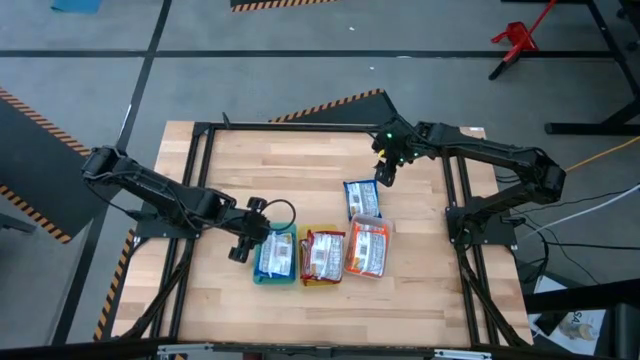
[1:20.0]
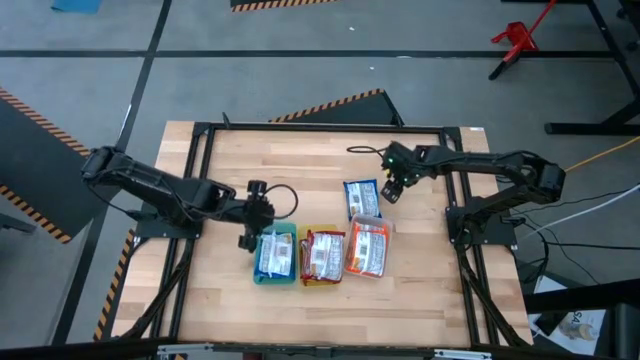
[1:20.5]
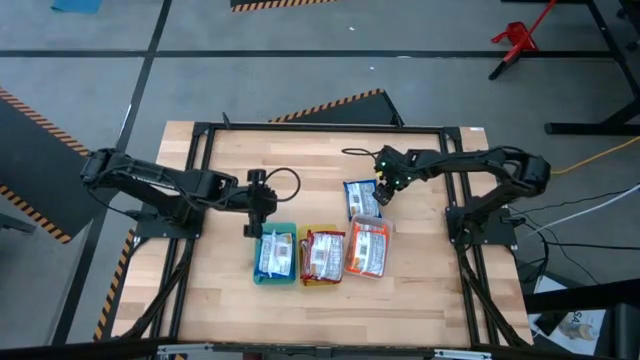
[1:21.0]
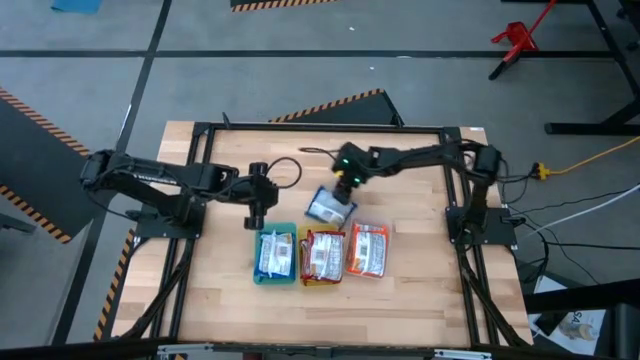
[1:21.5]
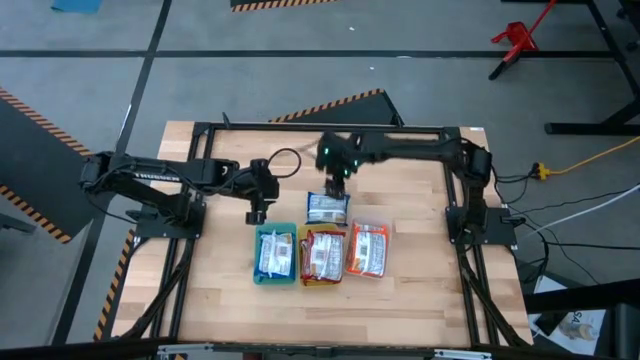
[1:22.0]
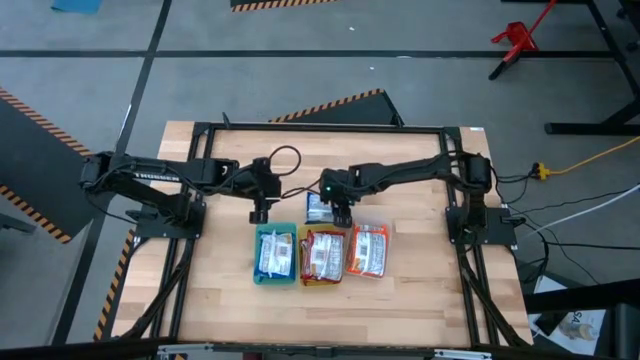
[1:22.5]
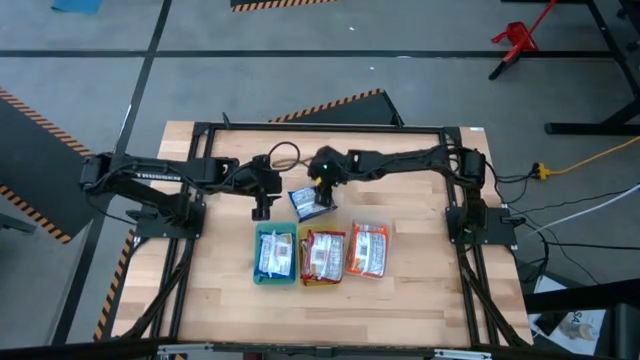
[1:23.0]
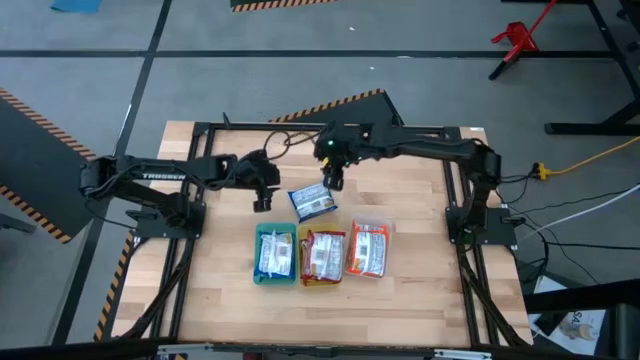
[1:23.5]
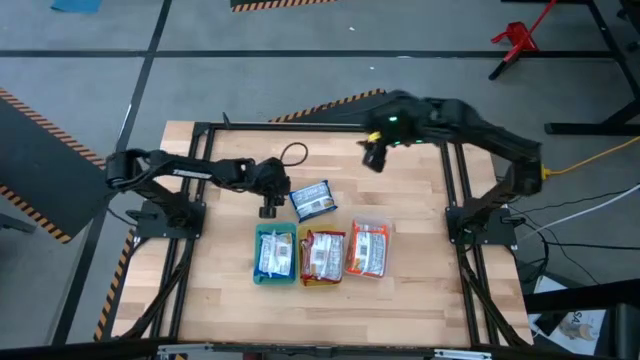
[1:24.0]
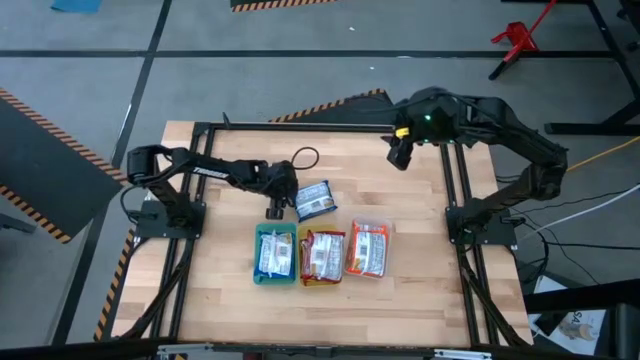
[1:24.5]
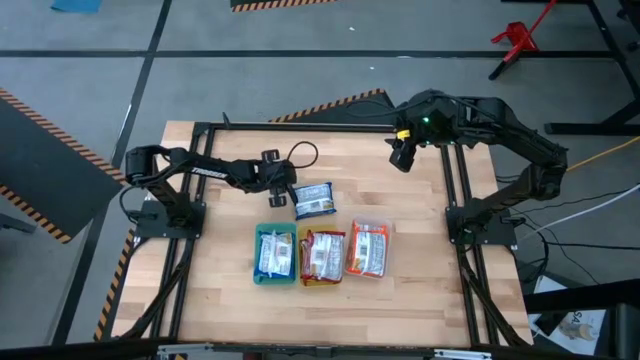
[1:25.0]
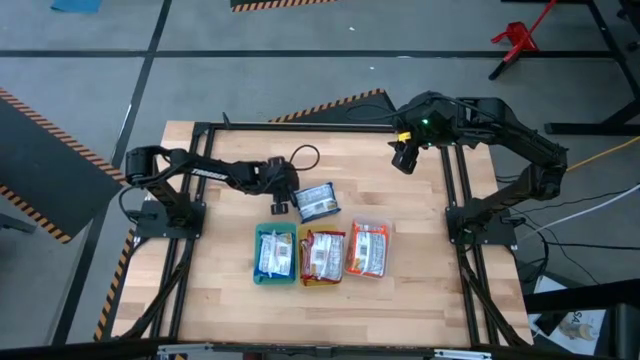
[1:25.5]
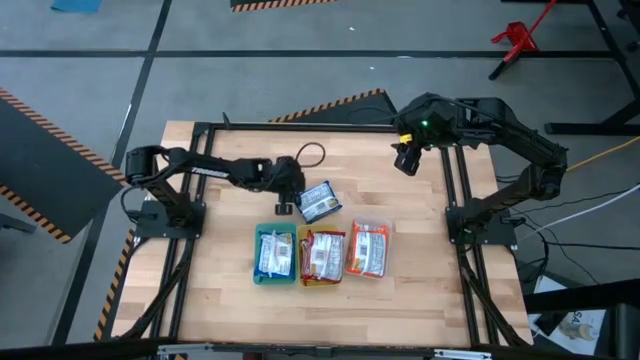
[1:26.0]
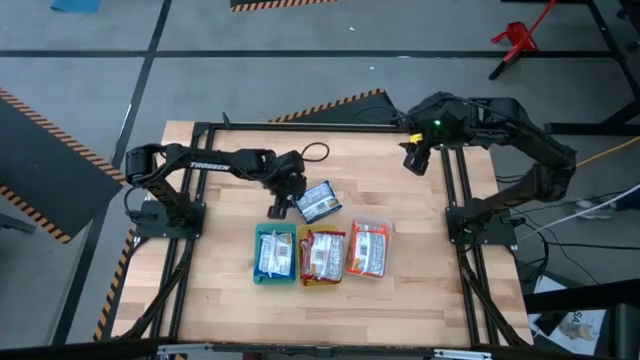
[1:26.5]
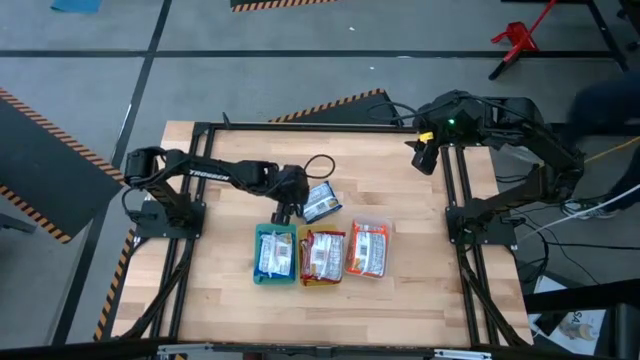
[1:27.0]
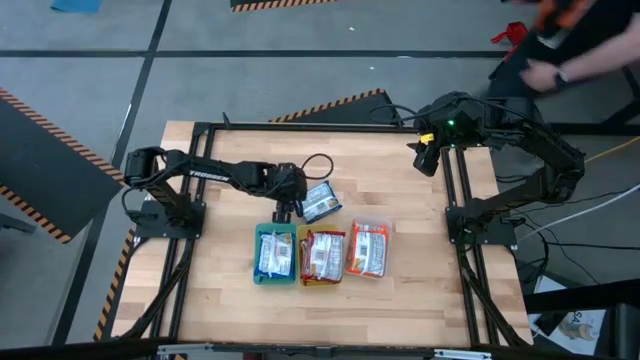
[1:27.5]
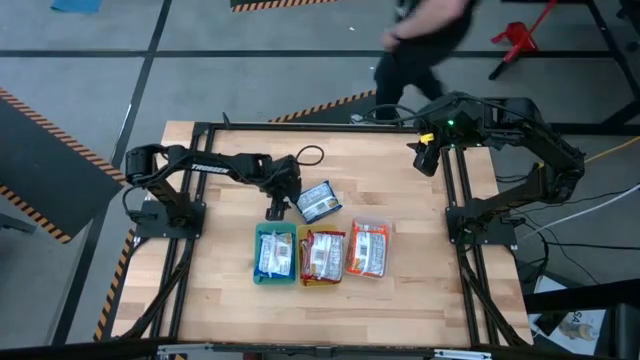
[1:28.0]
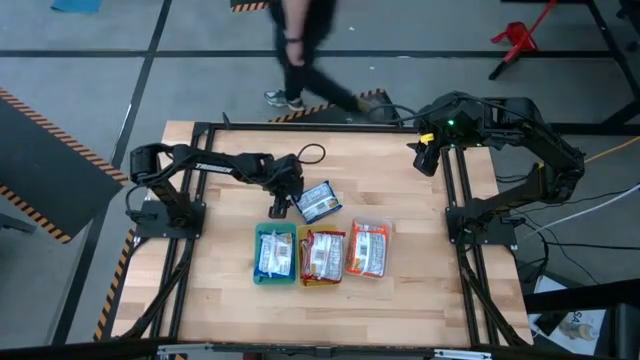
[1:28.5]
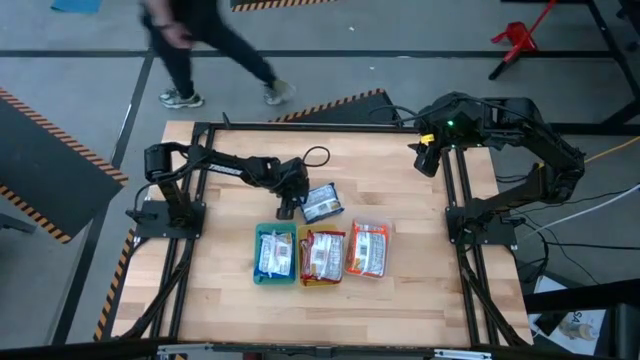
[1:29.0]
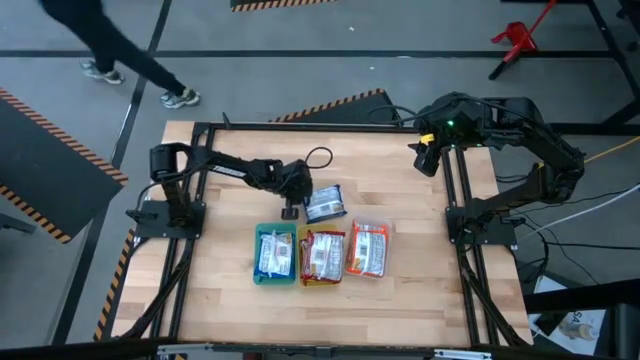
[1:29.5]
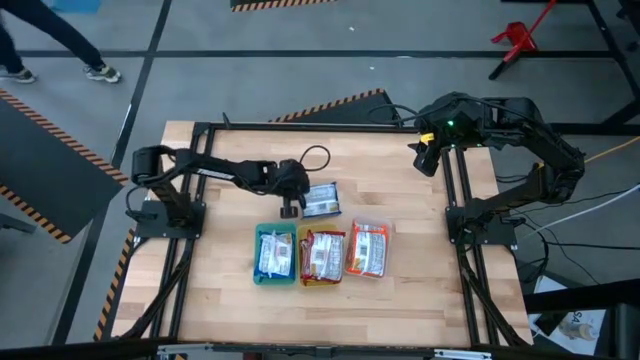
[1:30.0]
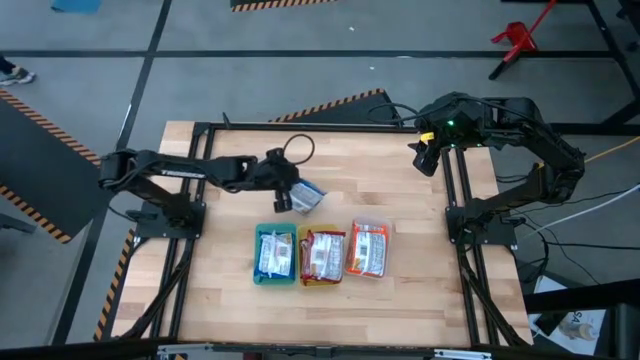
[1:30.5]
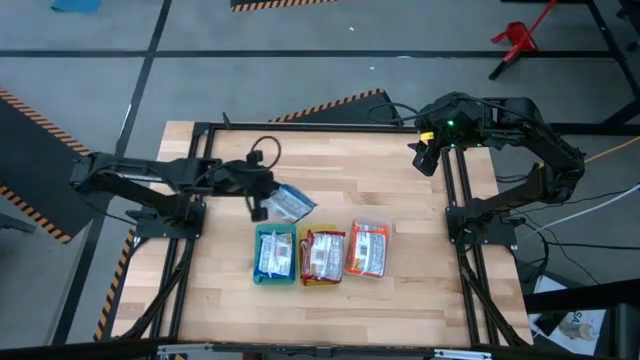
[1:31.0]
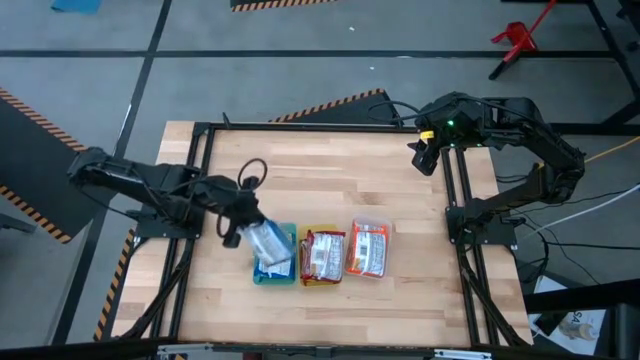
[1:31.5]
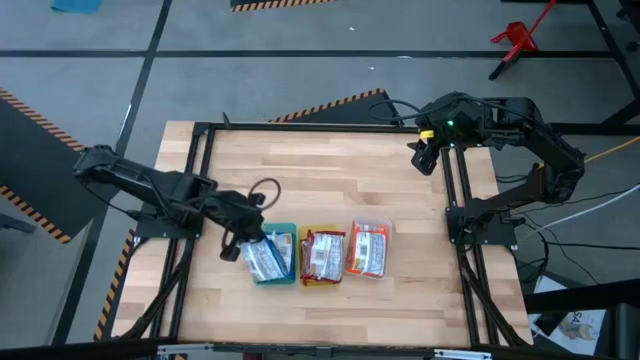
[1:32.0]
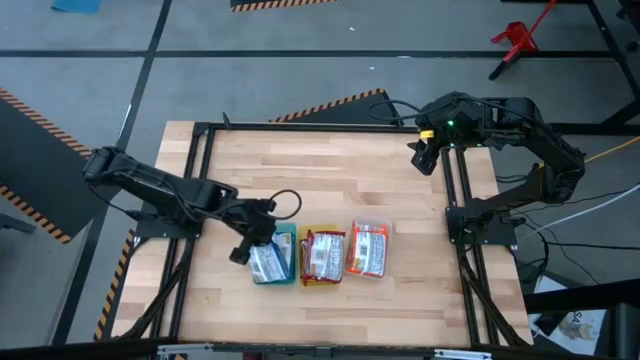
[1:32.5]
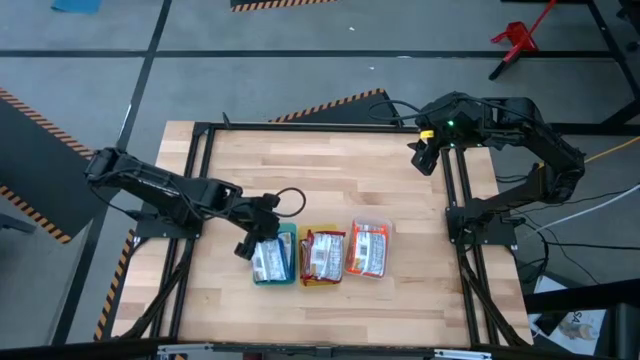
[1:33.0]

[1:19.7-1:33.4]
Task: Sort Maruchan noodles
Put the blue noodle pack into the green bin

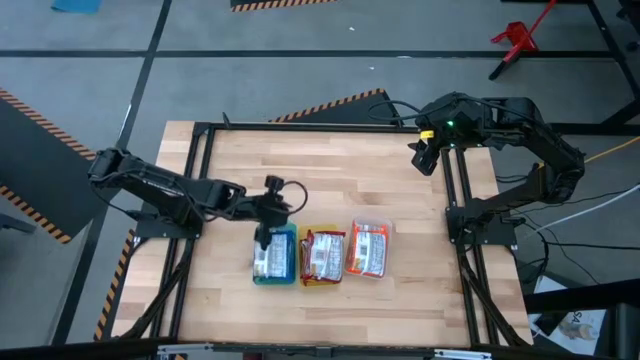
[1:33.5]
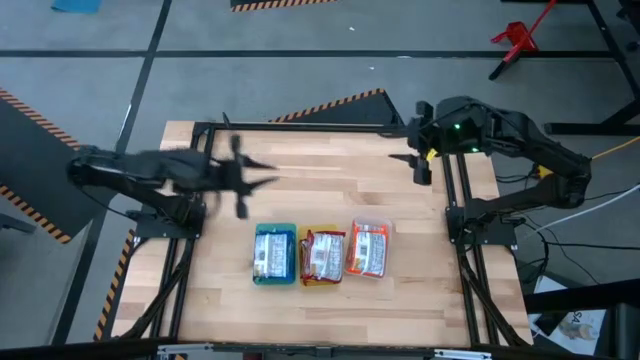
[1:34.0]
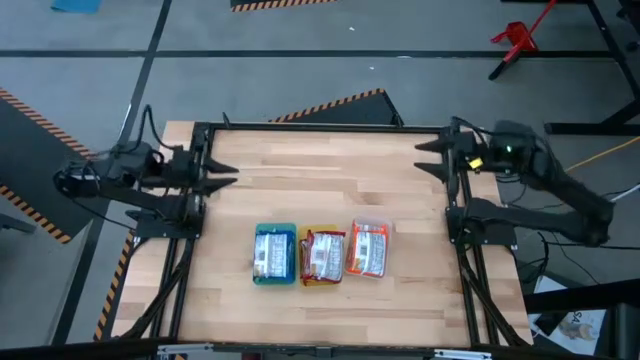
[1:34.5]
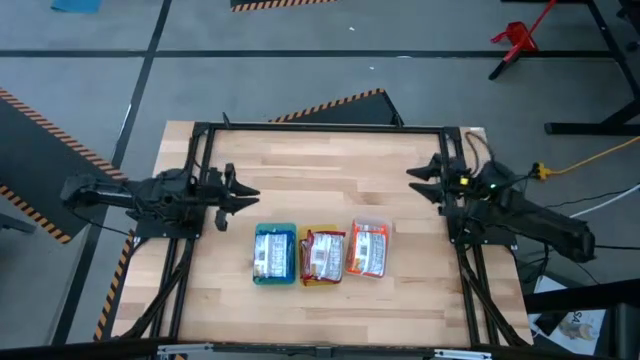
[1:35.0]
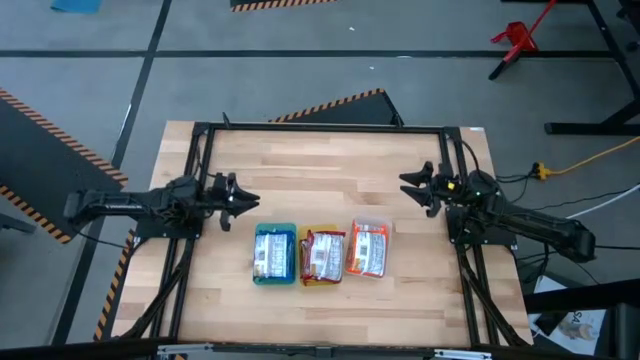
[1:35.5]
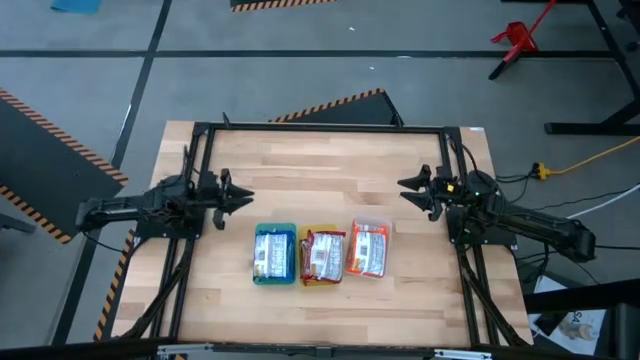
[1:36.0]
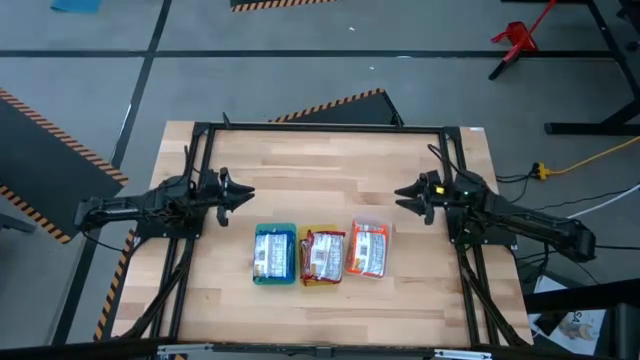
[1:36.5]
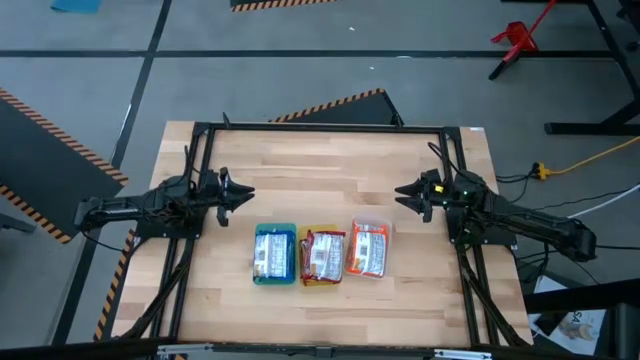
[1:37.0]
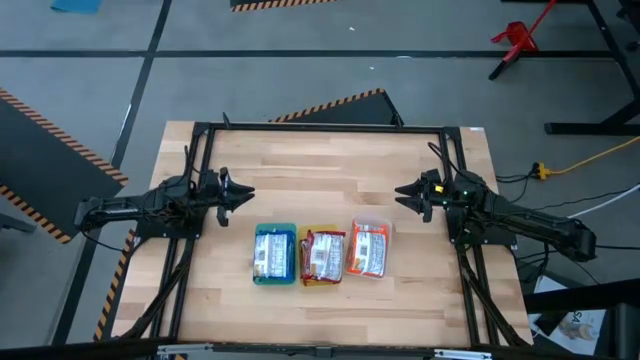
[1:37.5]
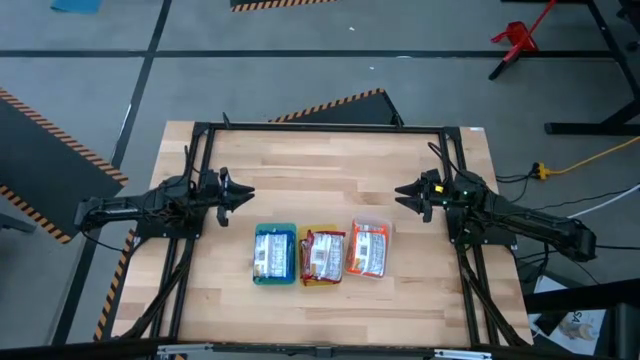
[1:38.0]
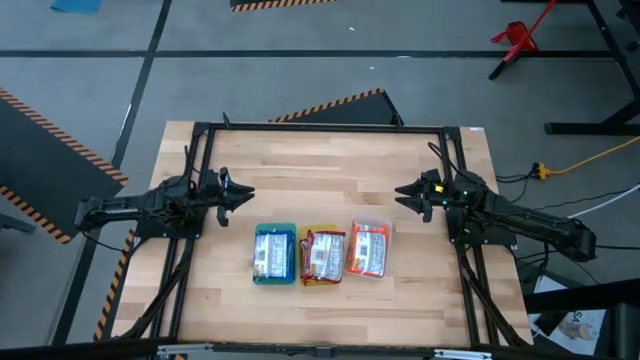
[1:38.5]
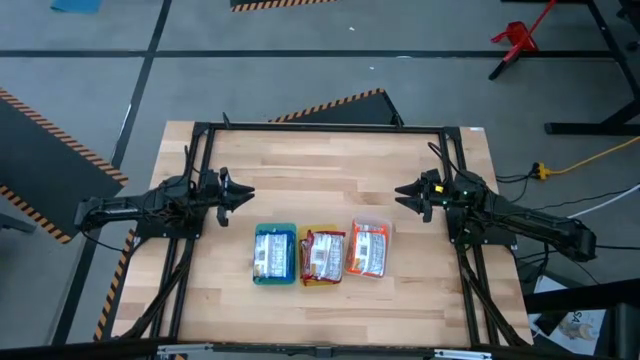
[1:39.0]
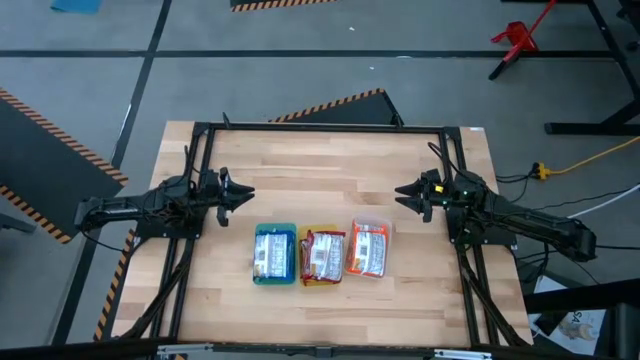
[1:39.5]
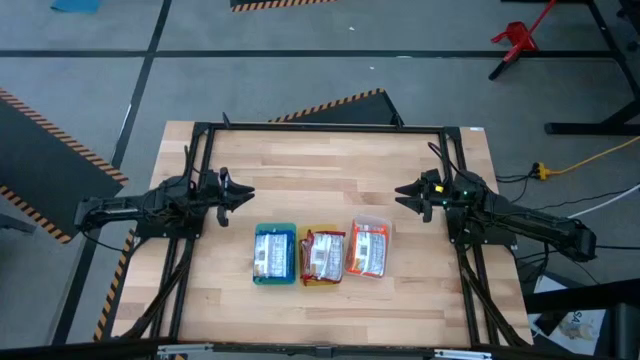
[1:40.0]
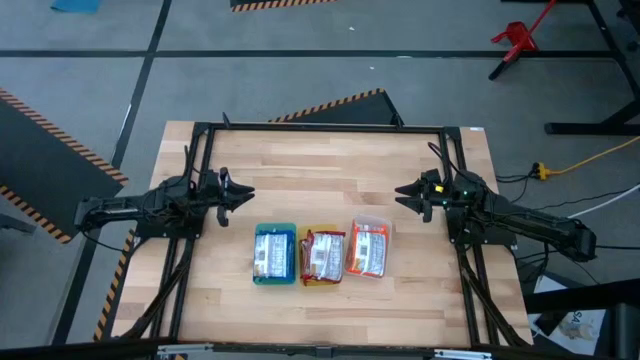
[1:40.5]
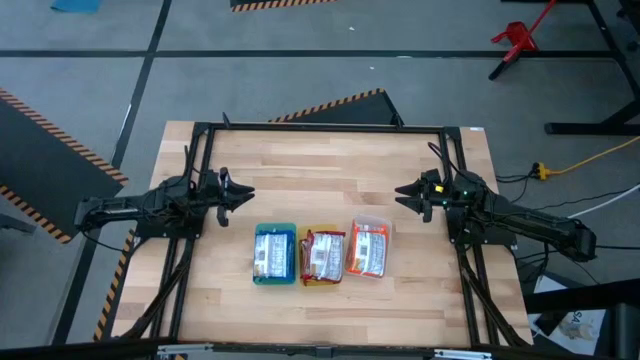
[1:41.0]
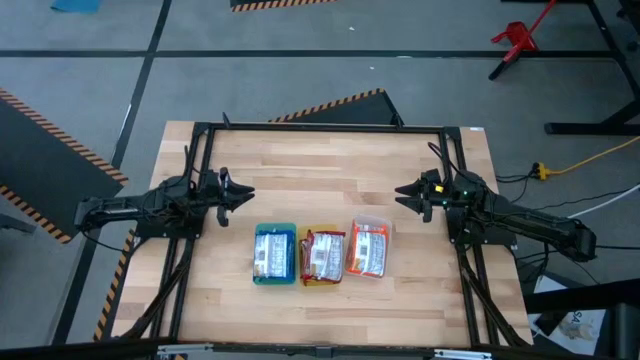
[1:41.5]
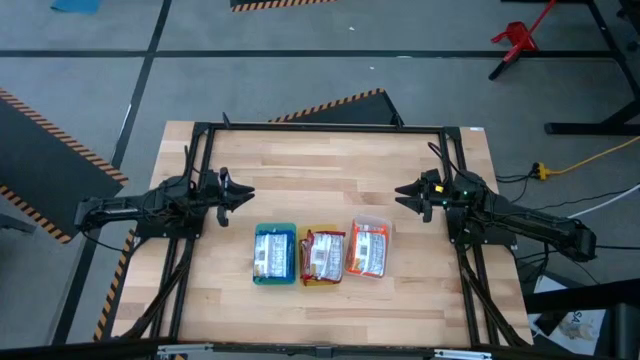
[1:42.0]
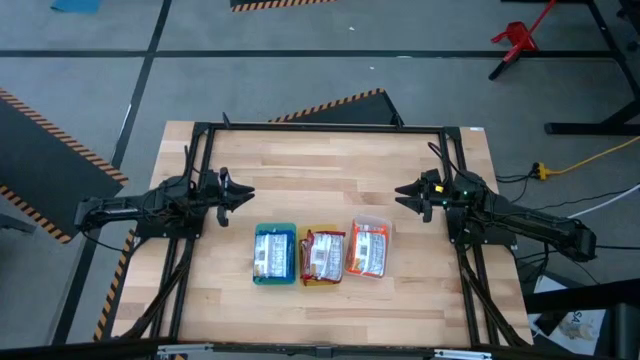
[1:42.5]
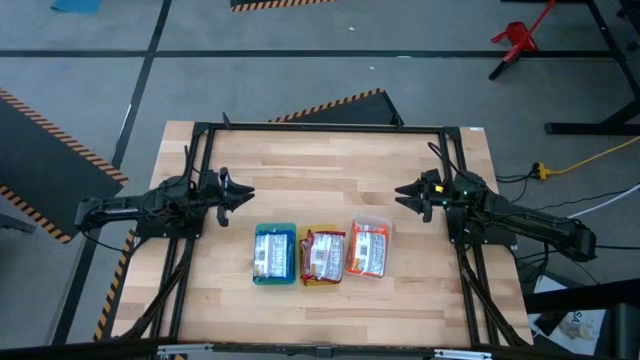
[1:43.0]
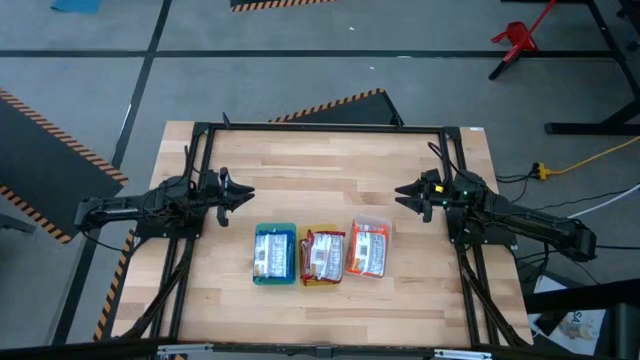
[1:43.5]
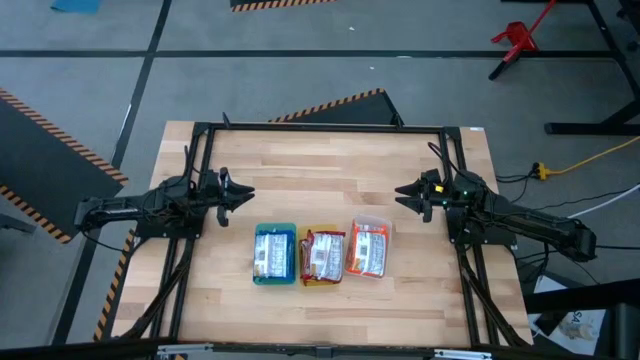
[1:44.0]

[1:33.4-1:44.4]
Return to Home Position
